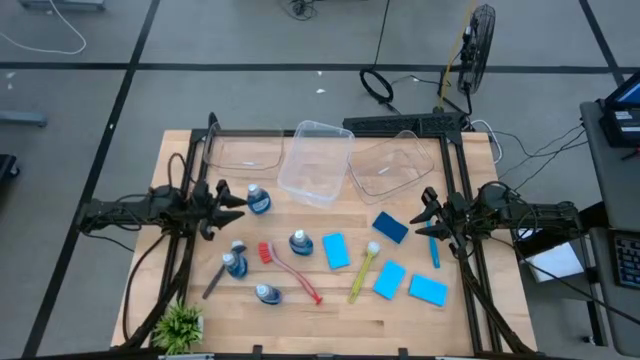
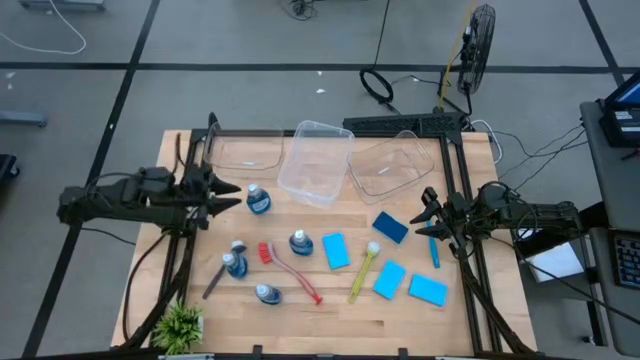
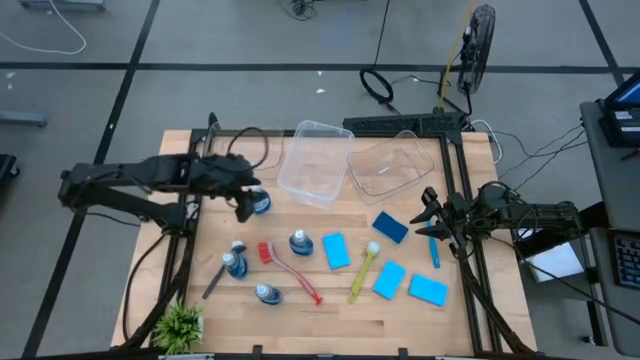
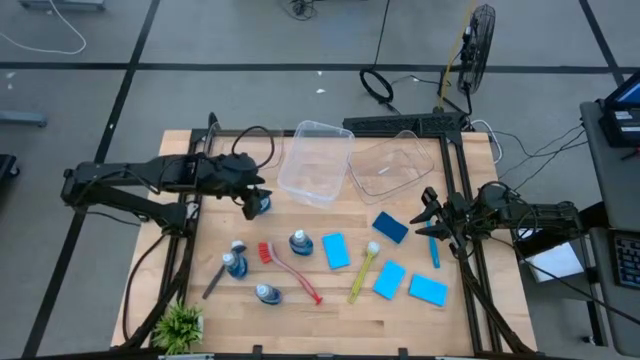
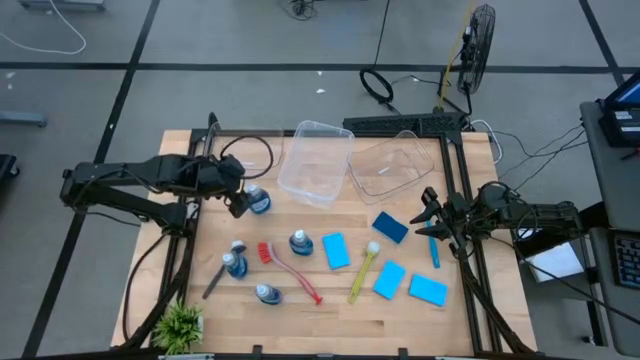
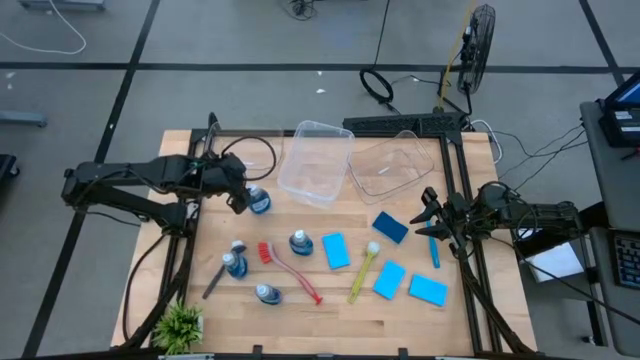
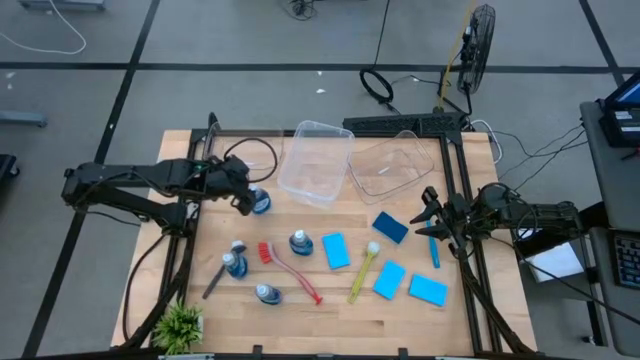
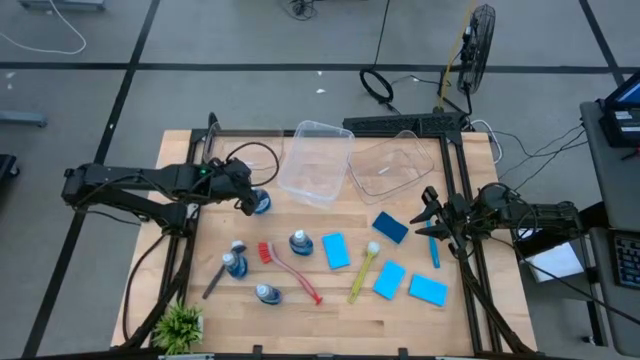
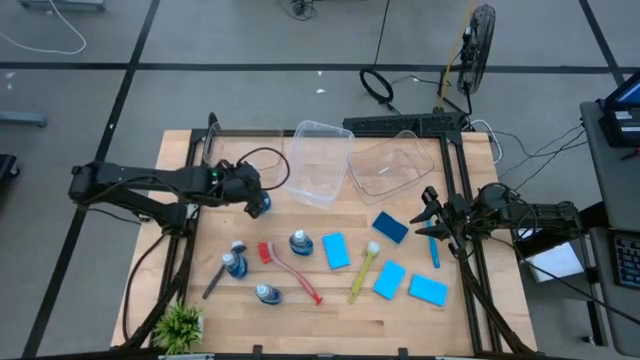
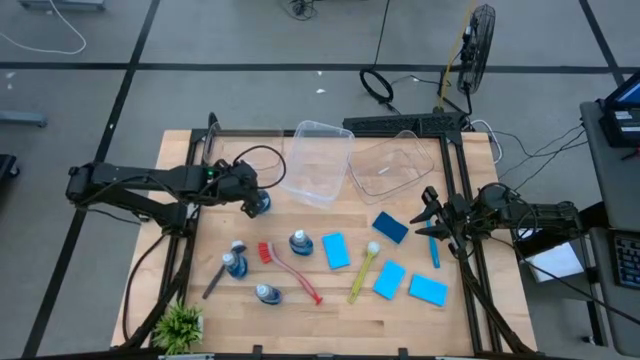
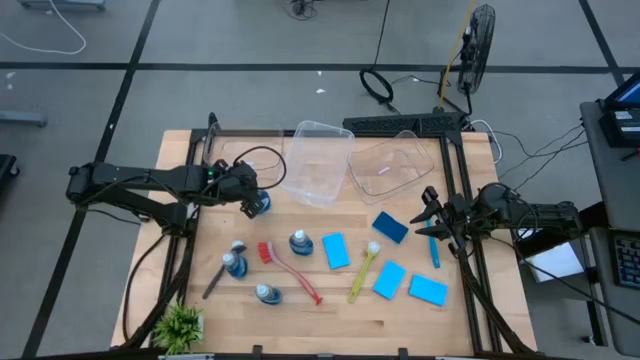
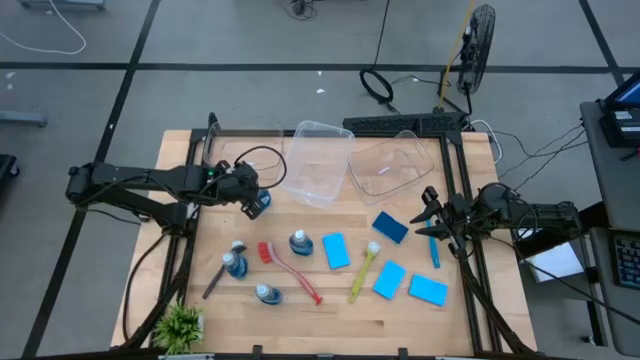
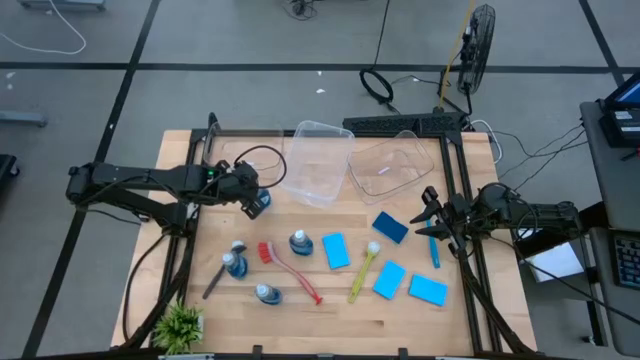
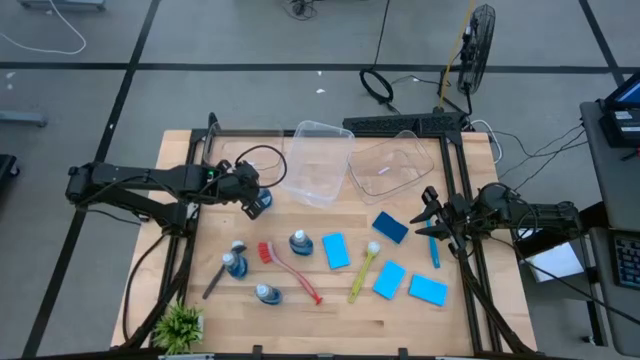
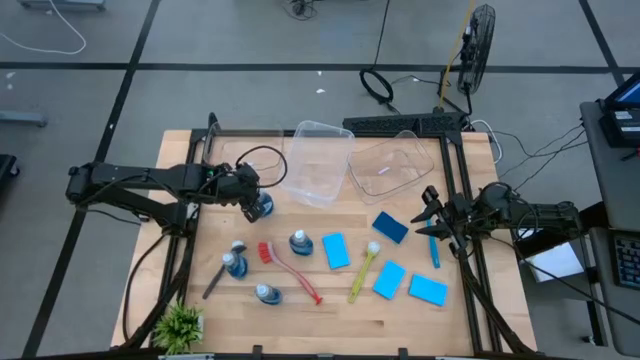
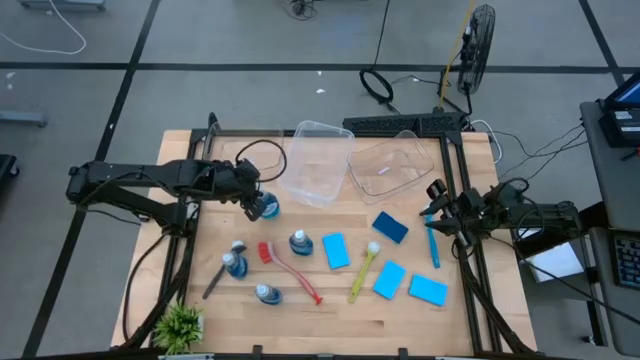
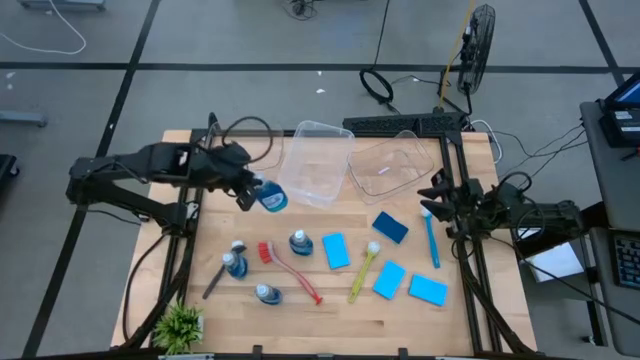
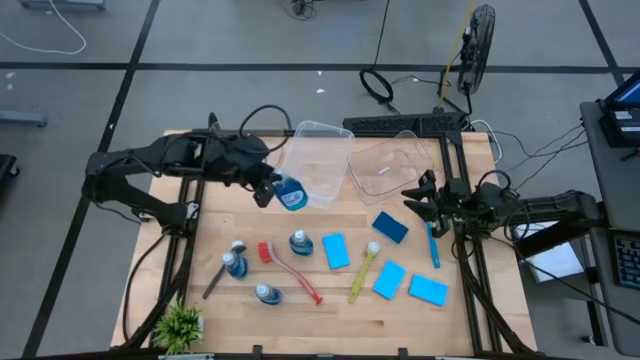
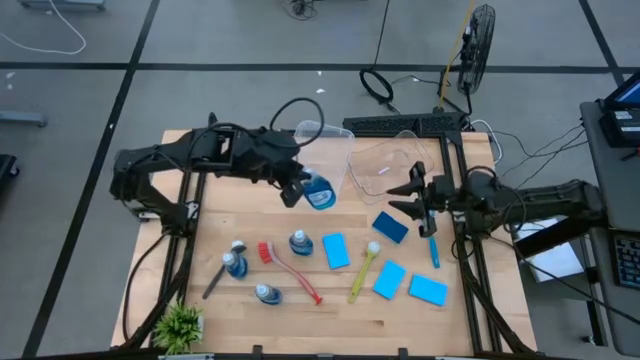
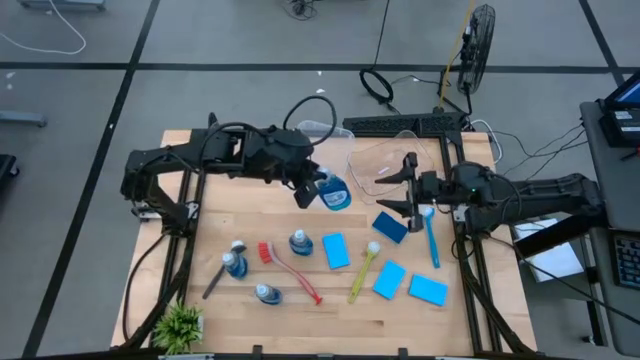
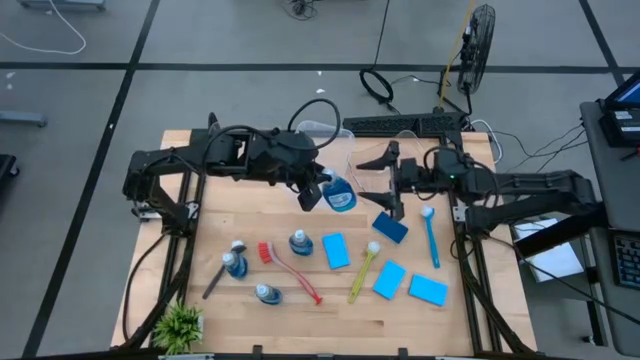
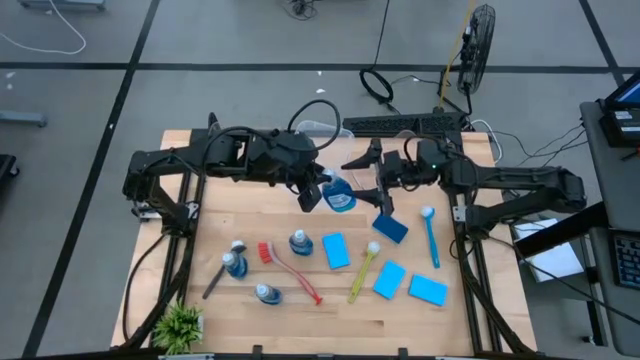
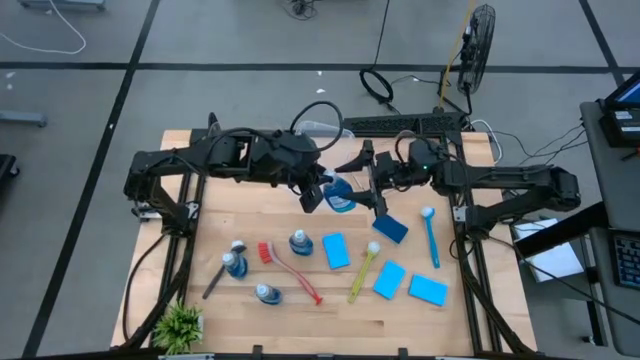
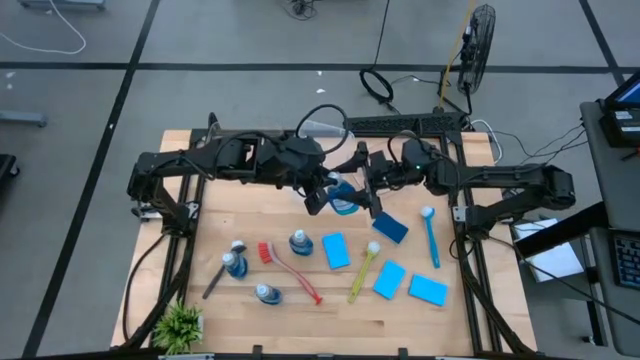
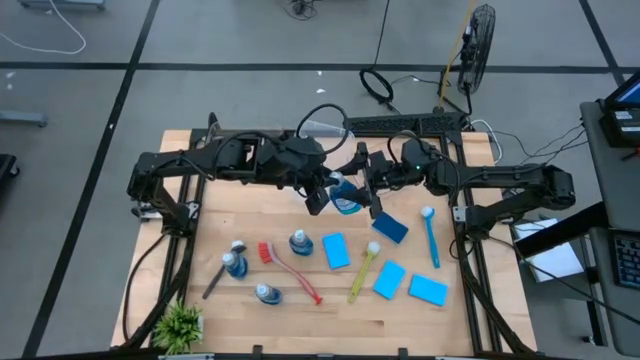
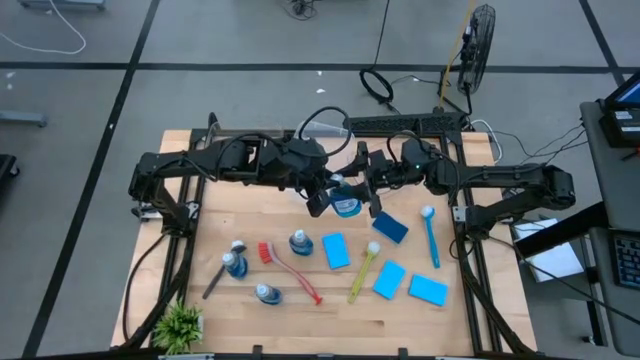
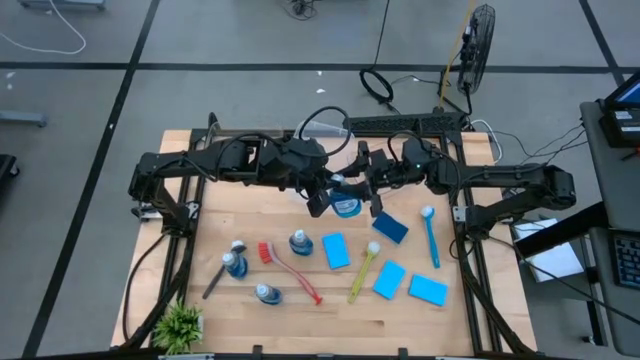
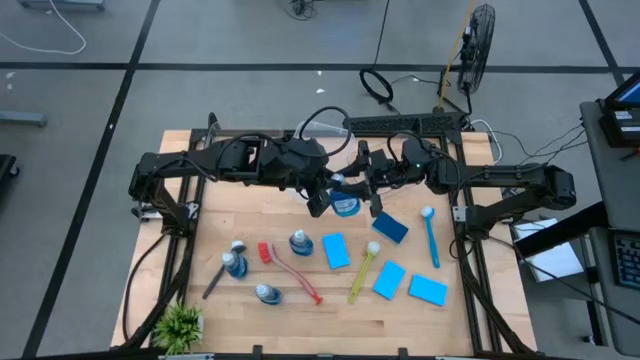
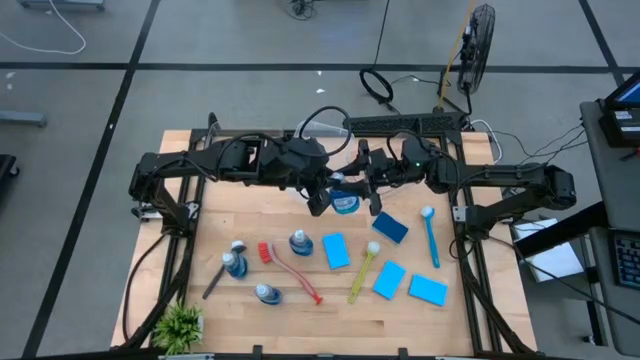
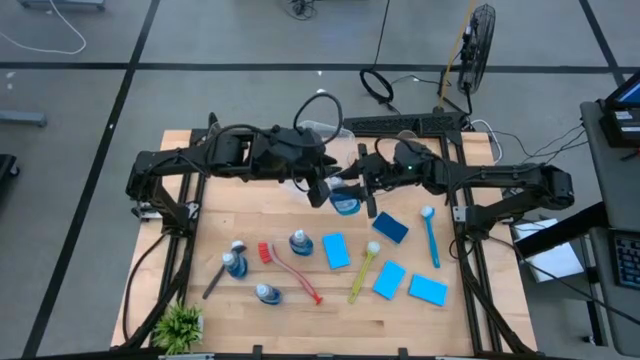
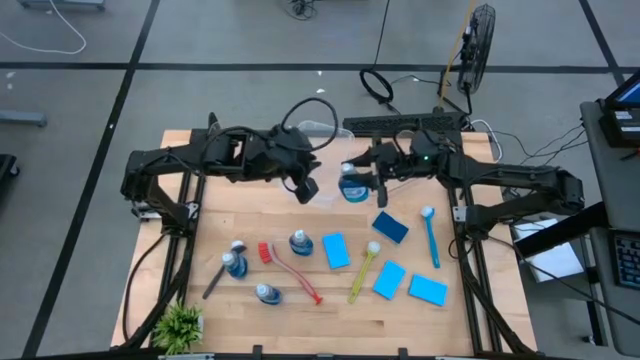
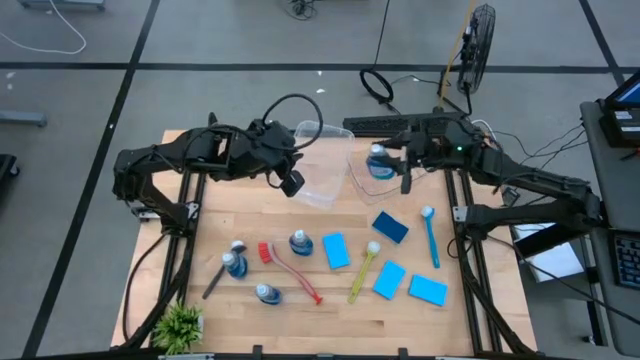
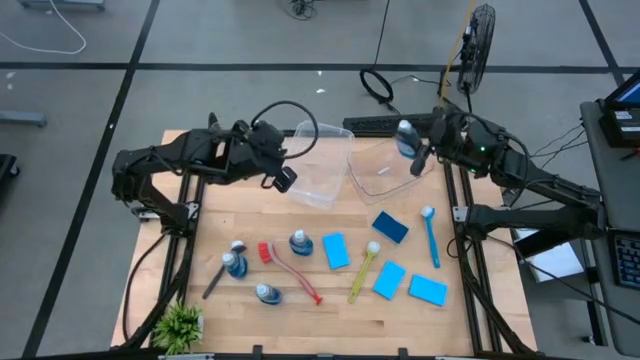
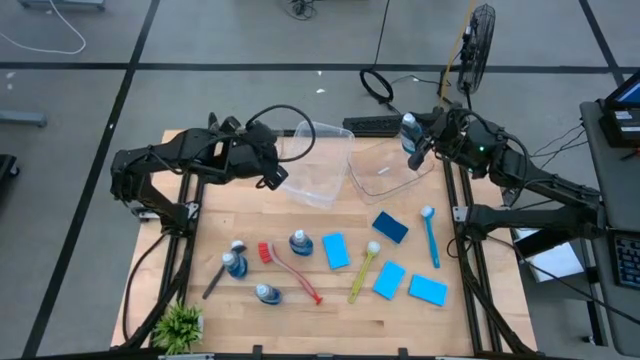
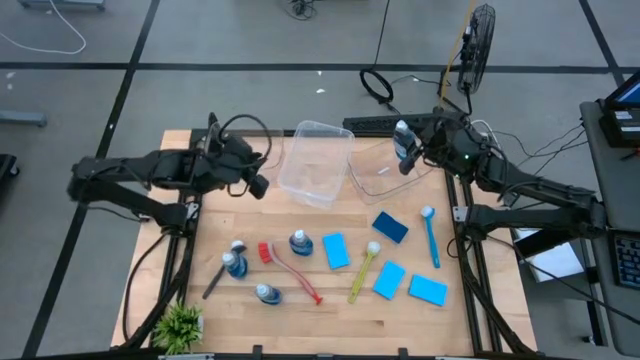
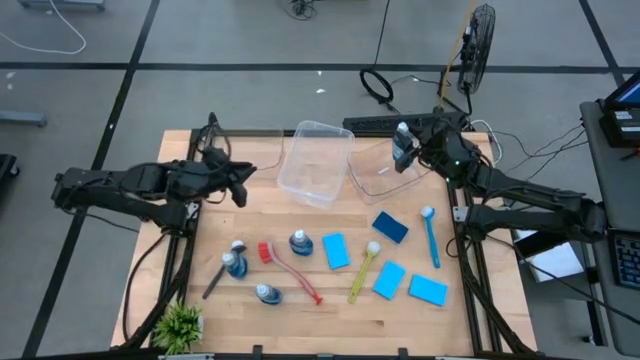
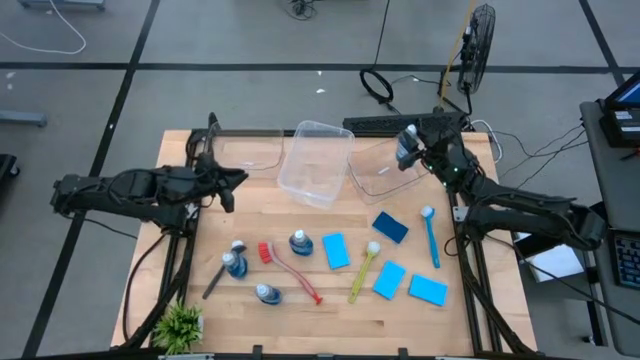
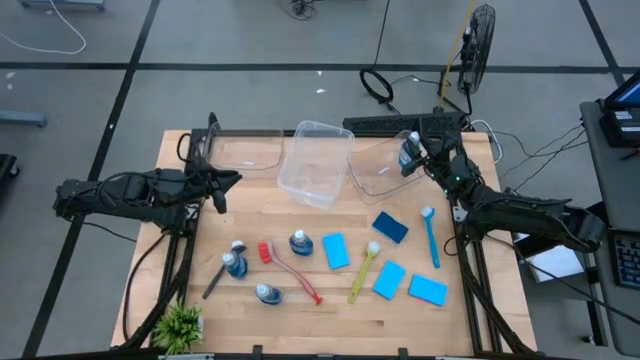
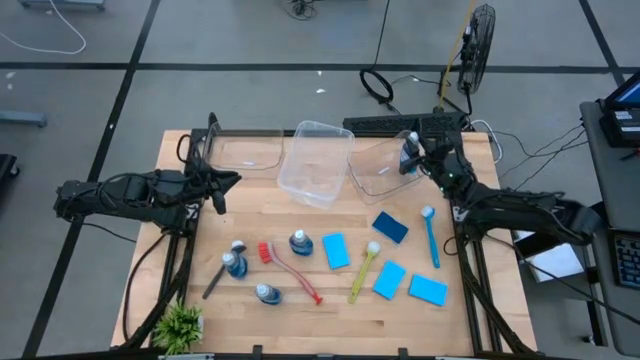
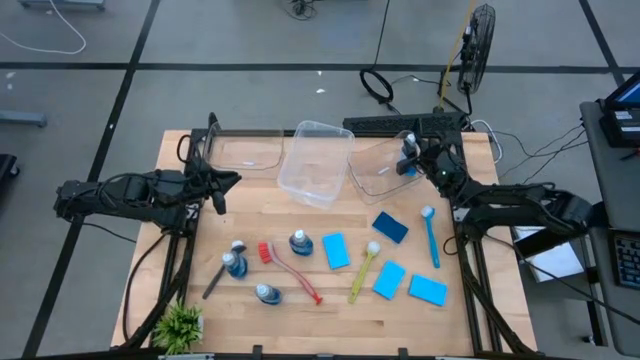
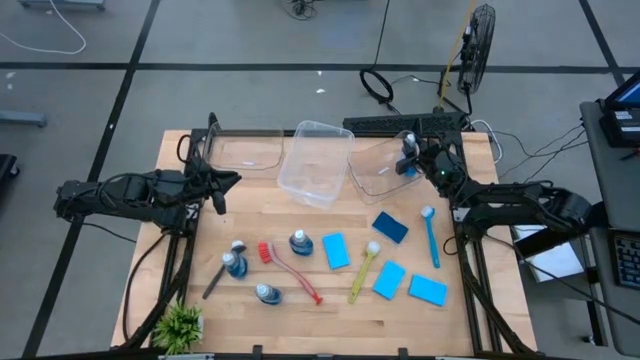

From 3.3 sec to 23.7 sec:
Task: Pick & Place Kitchen Sink Supplies
Put the blue dish soap into the right transparent bin
